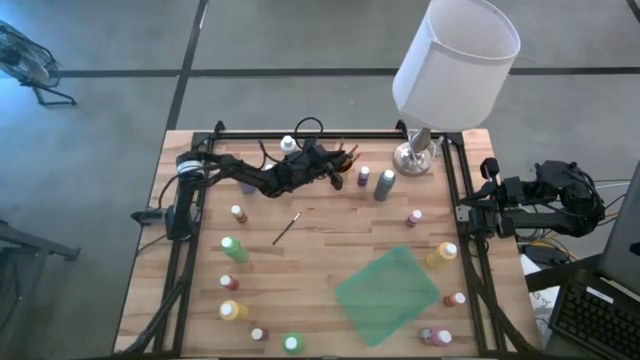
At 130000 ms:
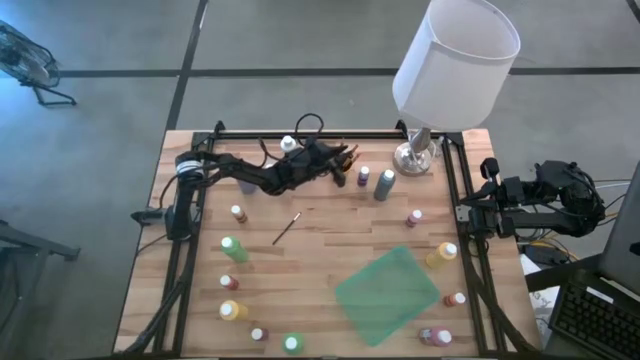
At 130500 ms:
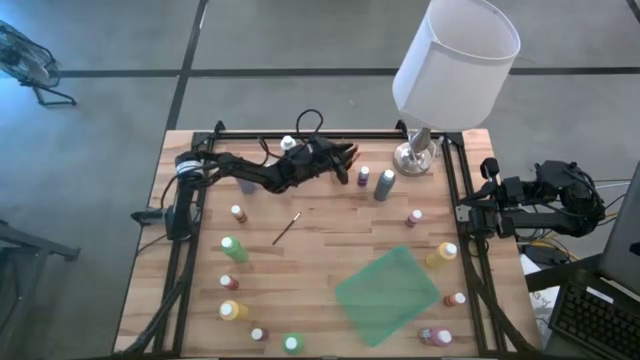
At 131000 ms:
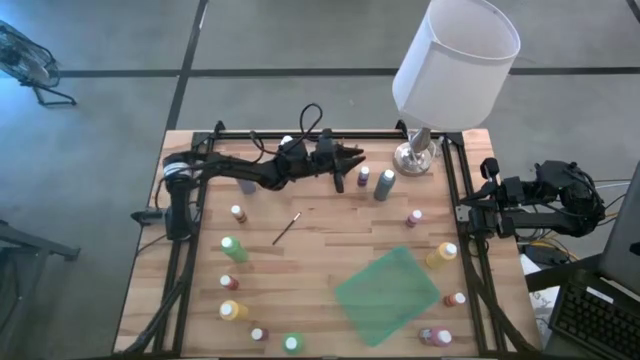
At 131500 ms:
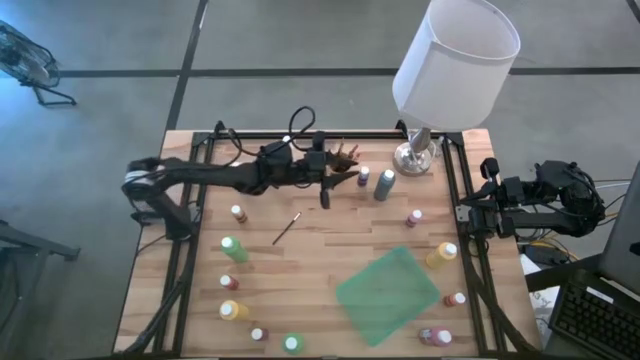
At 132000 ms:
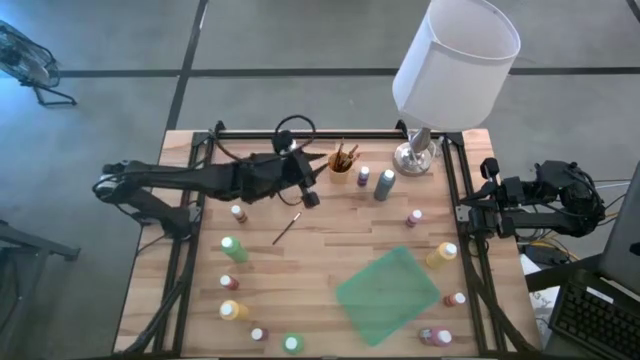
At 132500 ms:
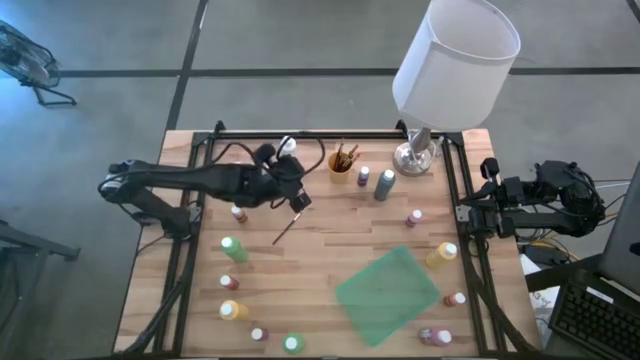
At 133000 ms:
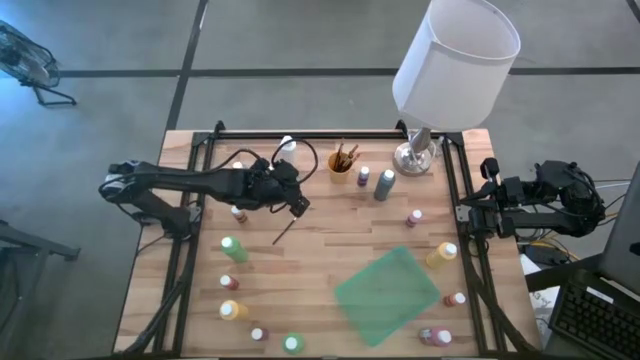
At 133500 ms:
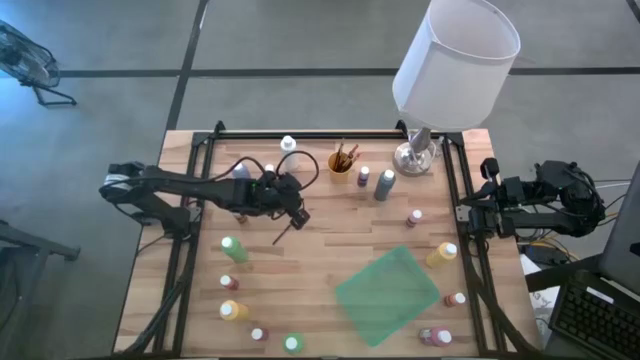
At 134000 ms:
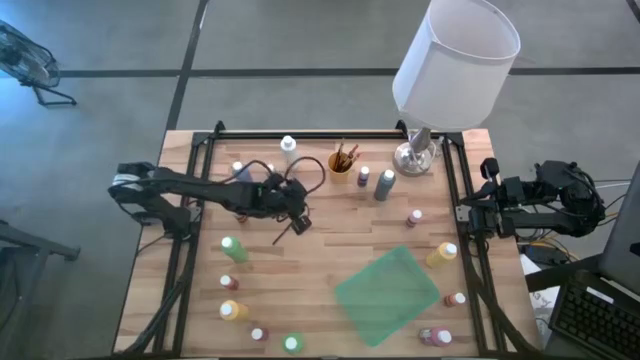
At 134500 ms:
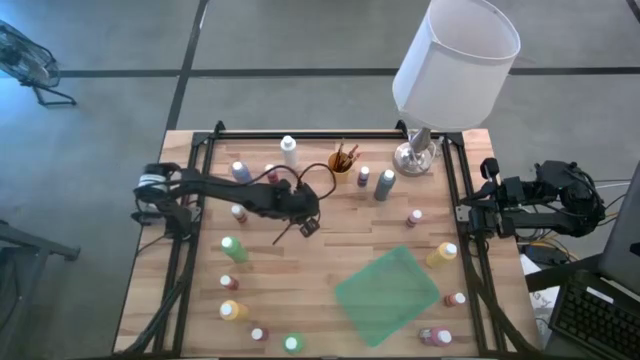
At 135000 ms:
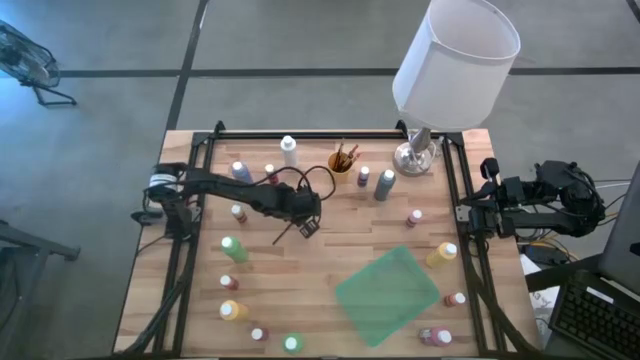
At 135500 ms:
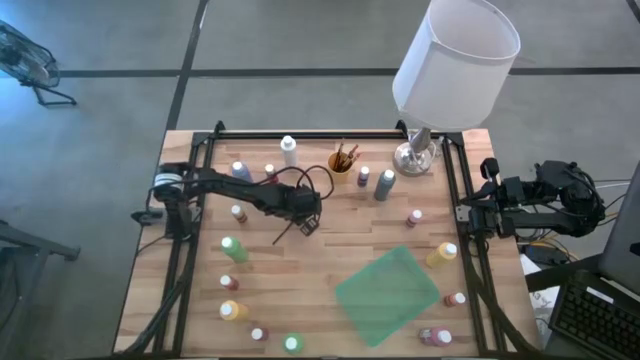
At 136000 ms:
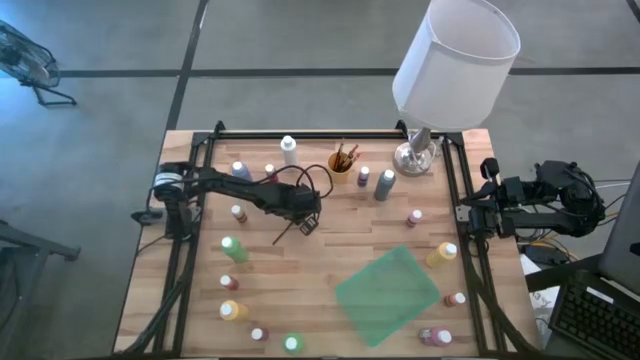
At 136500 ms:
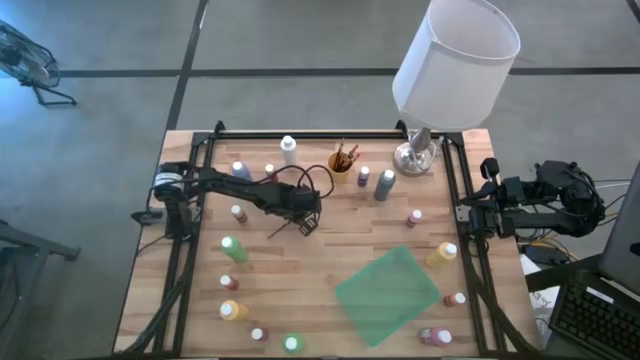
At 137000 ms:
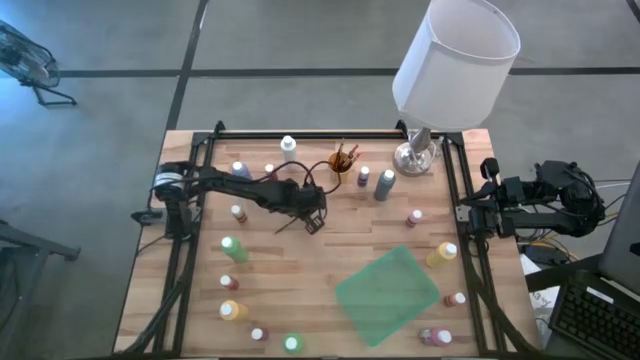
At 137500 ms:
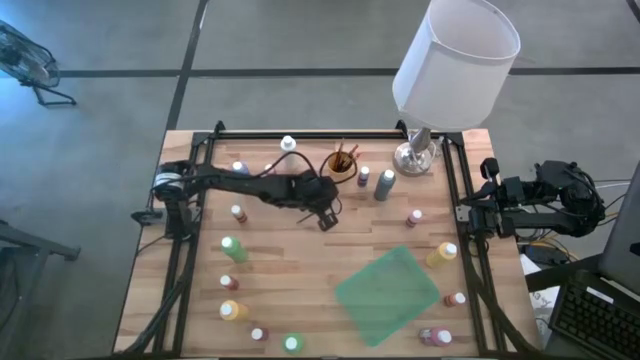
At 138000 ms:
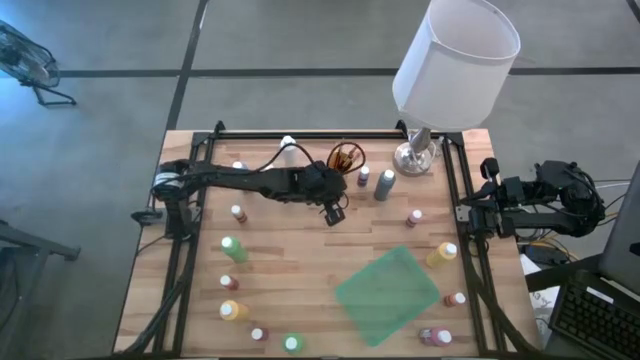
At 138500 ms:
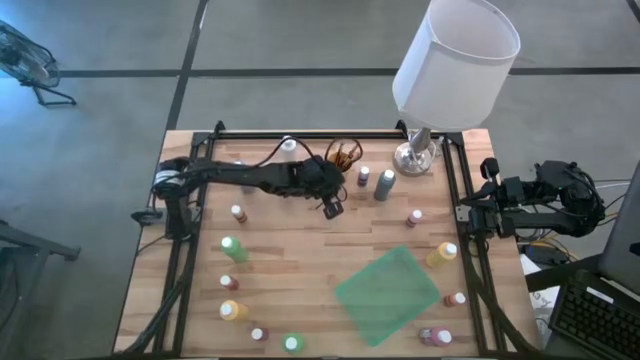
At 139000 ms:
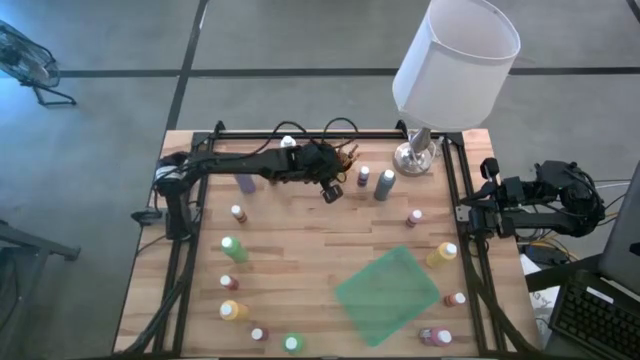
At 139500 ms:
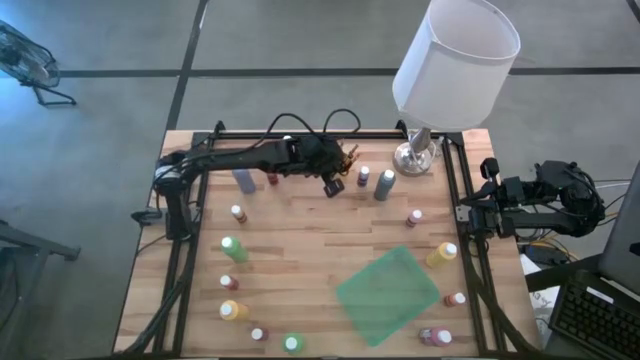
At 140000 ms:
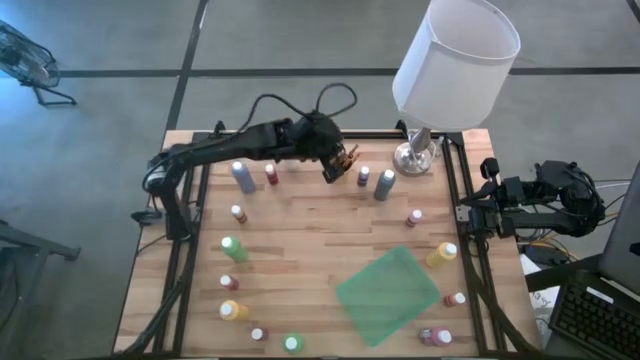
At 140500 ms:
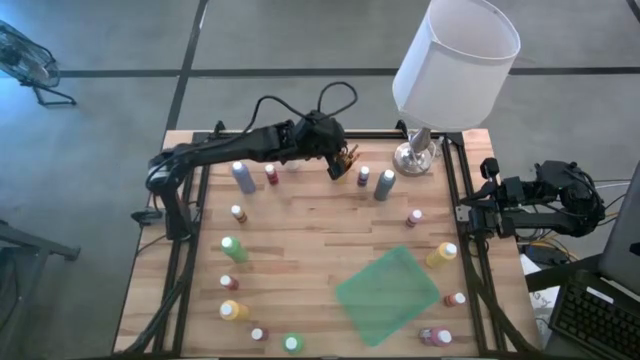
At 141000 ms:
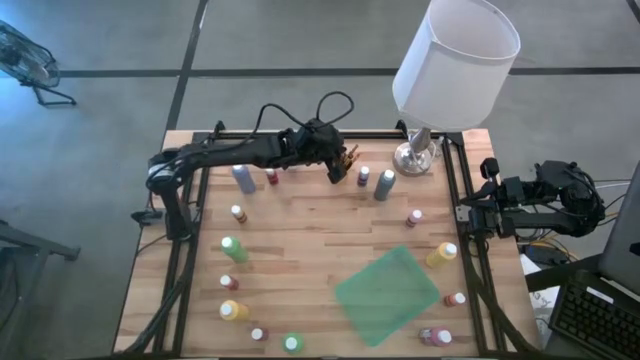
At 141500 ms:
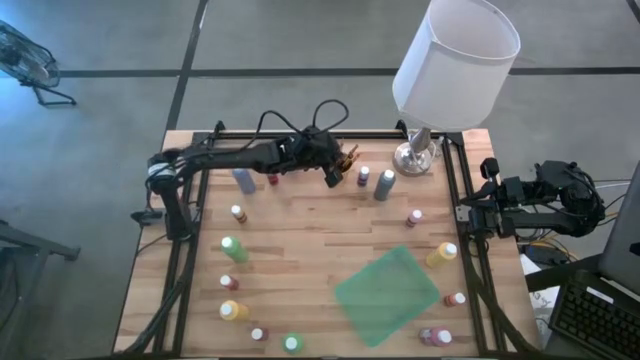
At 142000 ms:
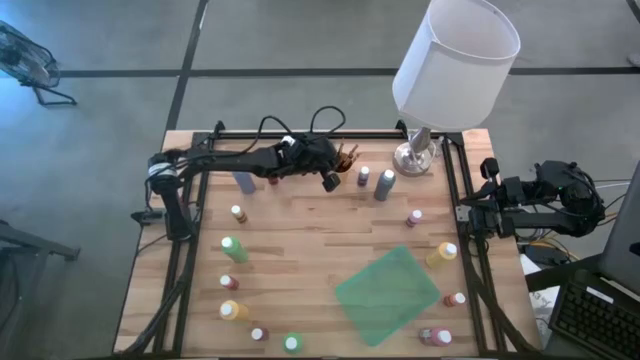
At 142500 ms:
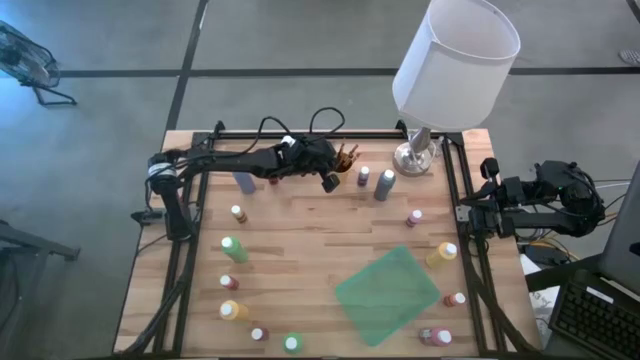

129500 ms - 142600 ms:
Task: Pick & Place Paint Supplies
Put the silver paintbrush into the yellow cup

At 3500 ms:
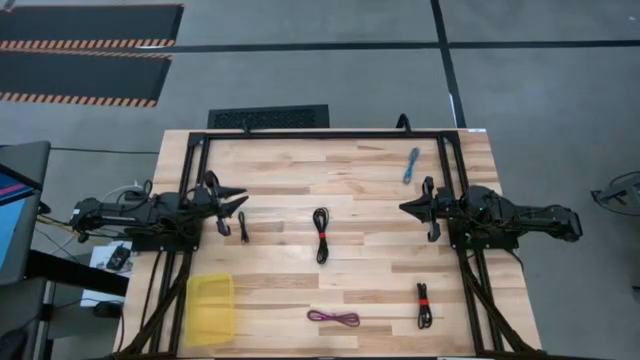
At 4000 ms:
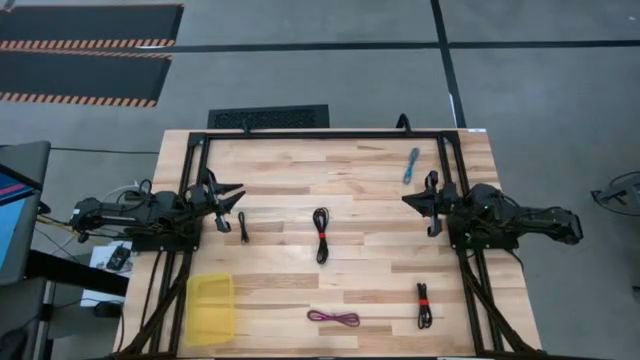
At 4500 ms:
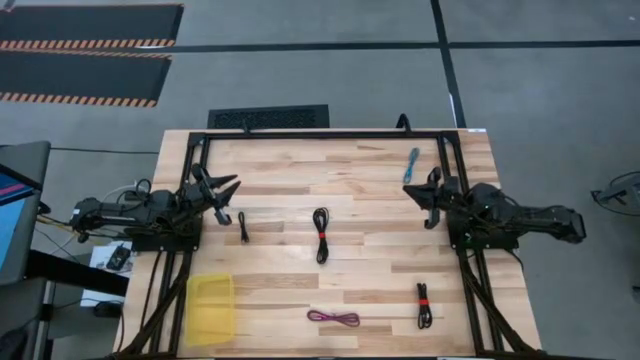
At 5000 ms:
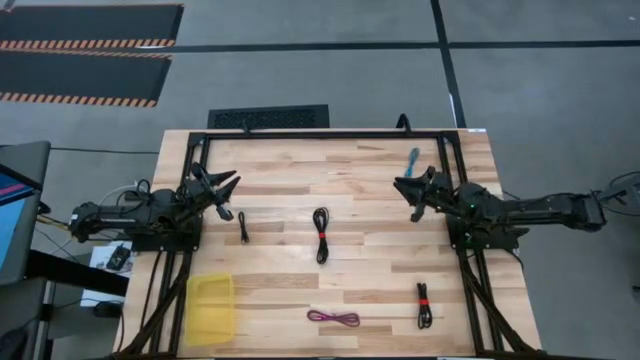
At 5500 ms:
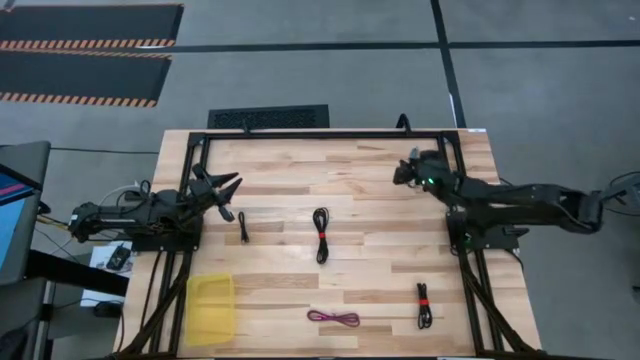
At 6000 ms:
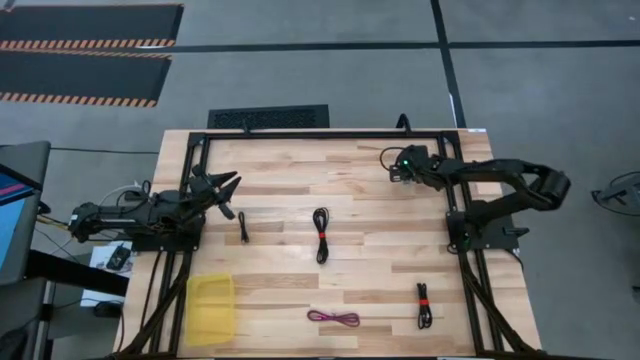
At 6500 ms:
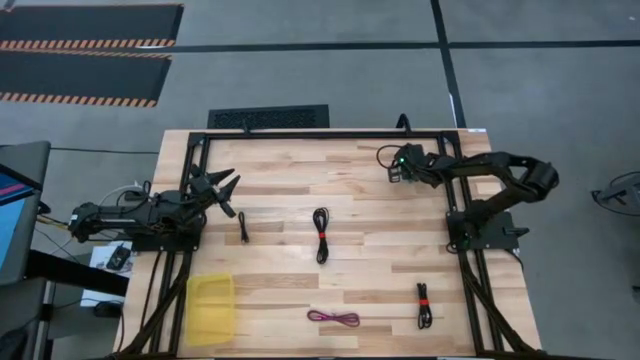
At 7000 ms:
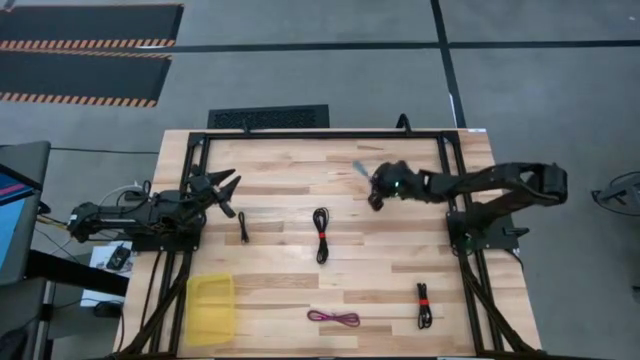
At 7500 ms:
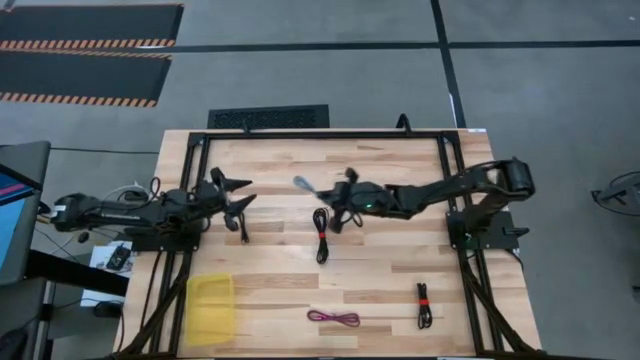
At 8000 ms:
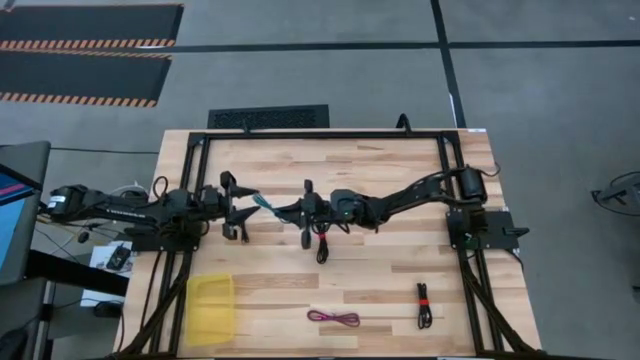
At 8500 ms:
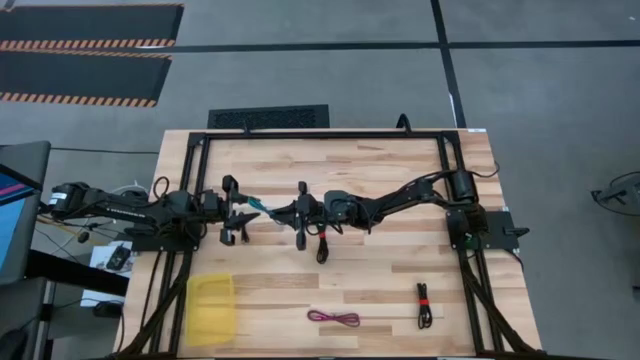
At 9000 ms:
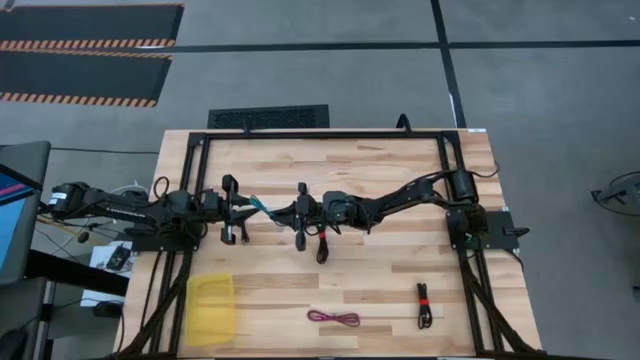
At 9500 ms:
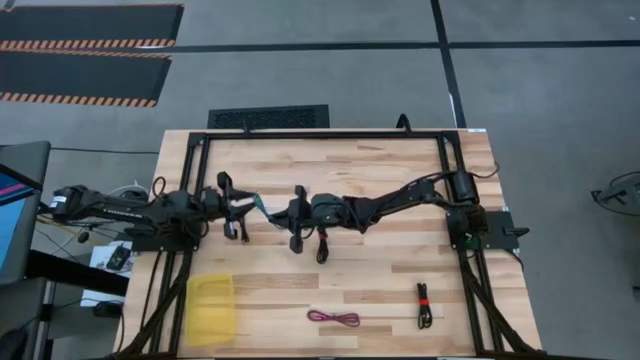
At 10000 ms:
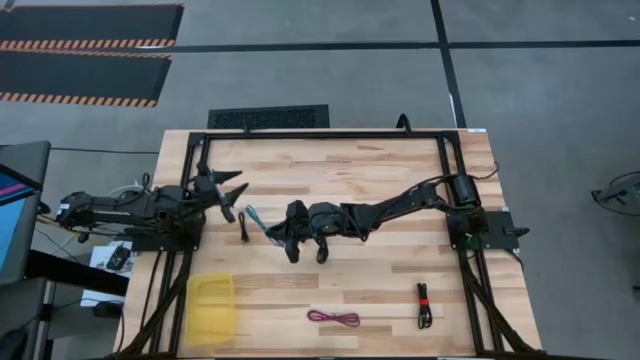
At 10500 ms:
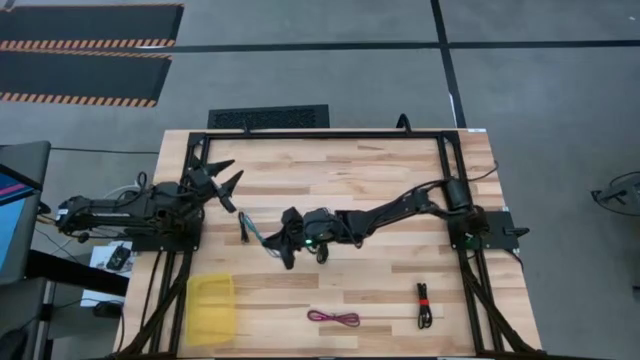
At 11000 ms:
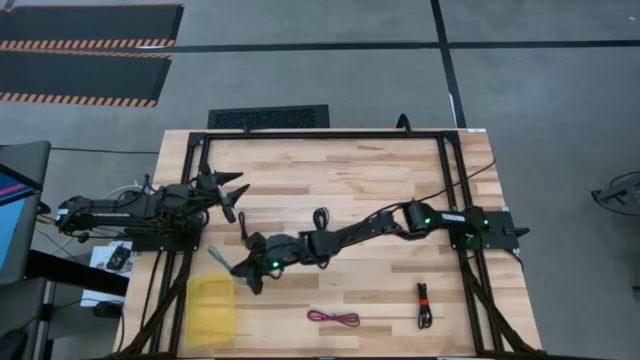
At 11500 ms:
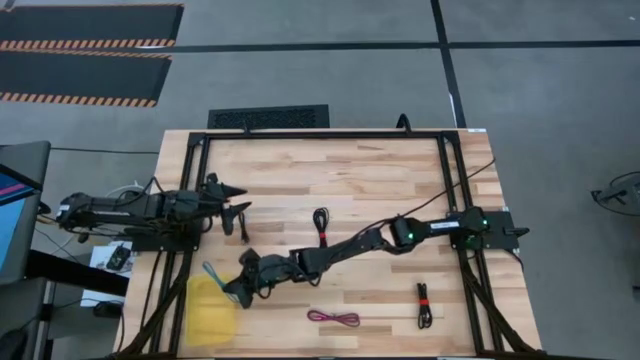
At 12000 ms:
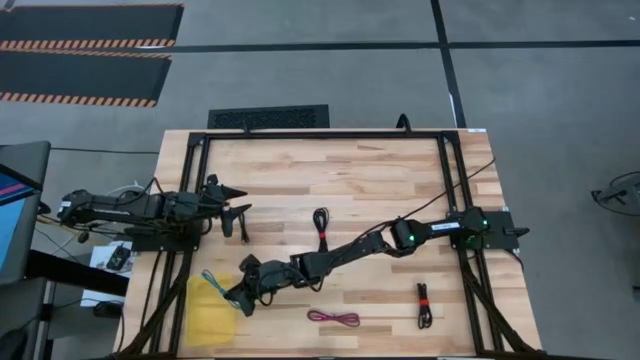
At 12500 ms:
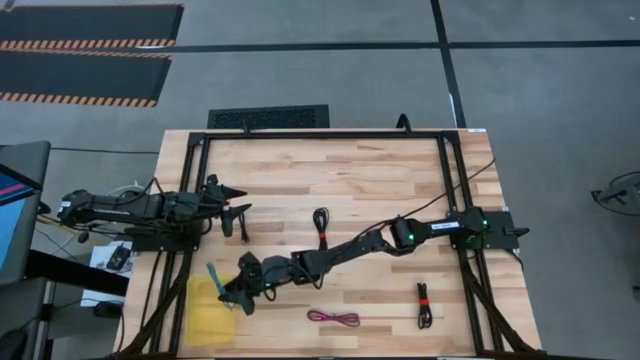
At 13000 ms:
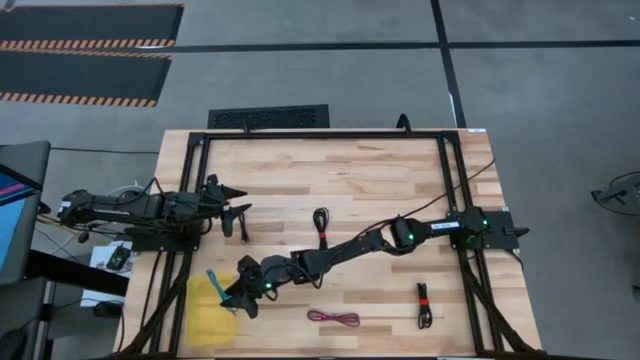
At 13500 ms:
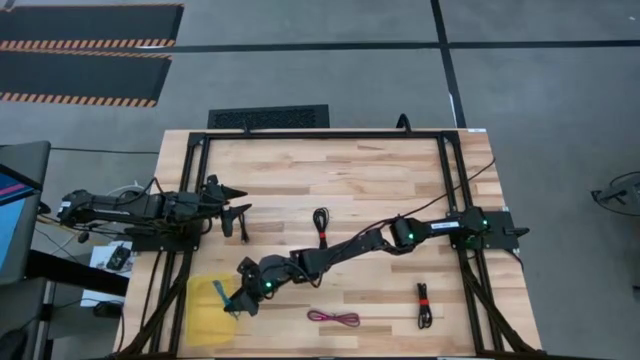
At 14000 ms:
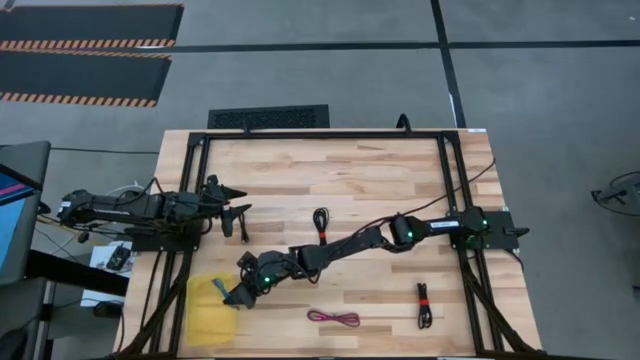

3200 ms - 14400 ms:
Task: Pick and place USB-C Cables
Put the blue charger cable into the yellow bin
